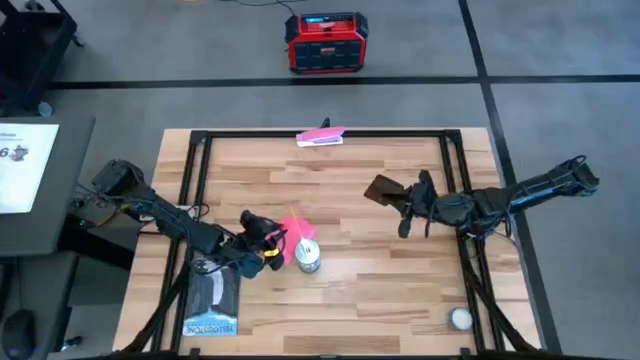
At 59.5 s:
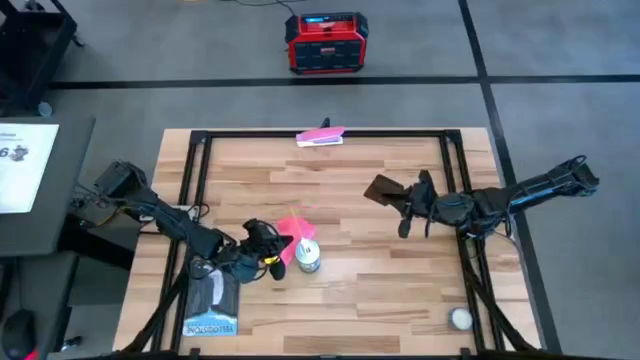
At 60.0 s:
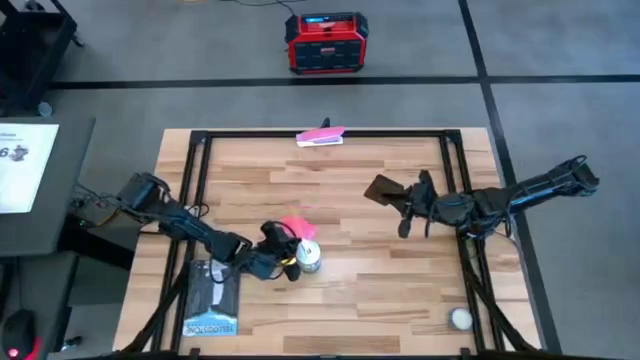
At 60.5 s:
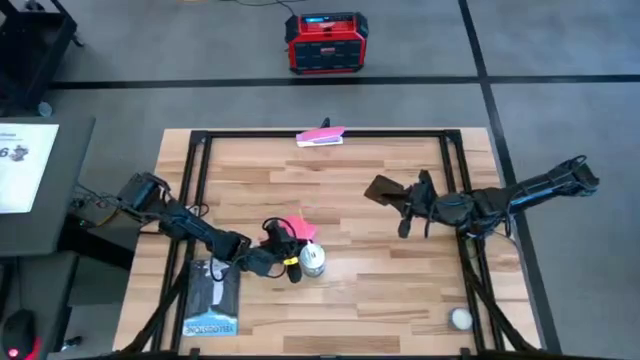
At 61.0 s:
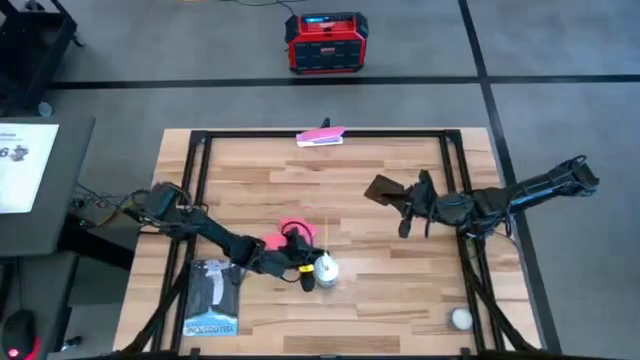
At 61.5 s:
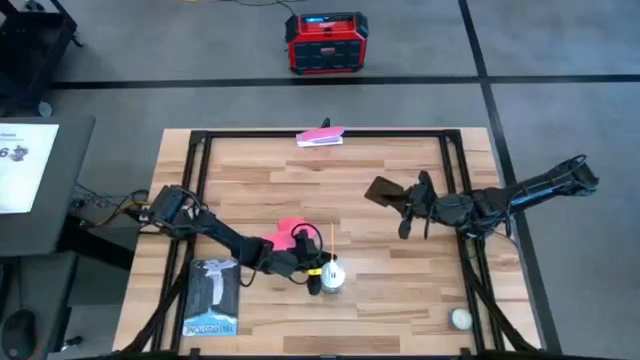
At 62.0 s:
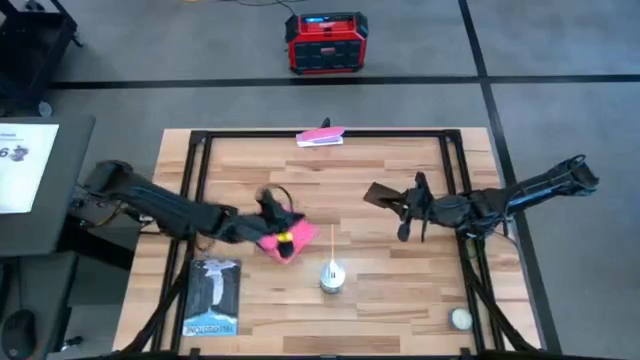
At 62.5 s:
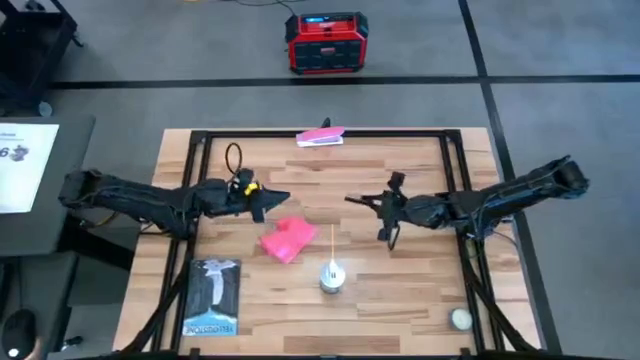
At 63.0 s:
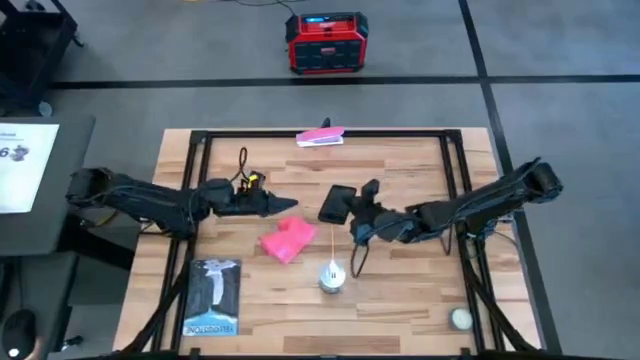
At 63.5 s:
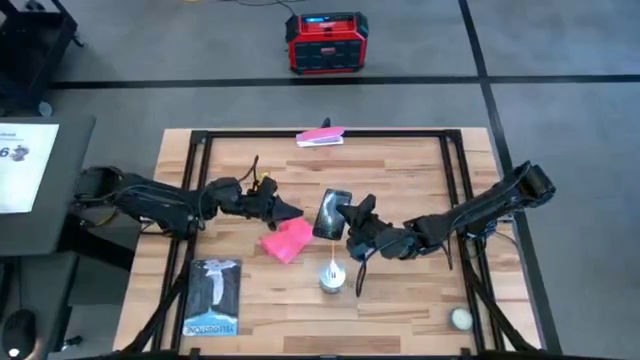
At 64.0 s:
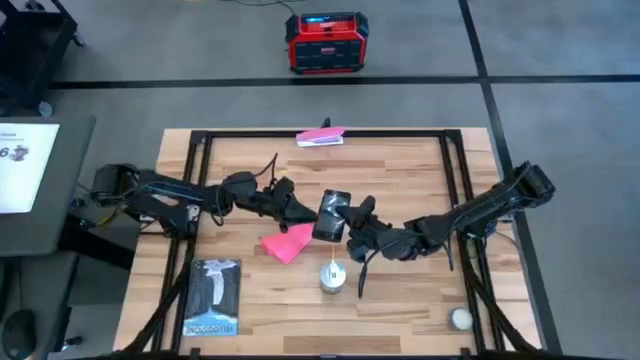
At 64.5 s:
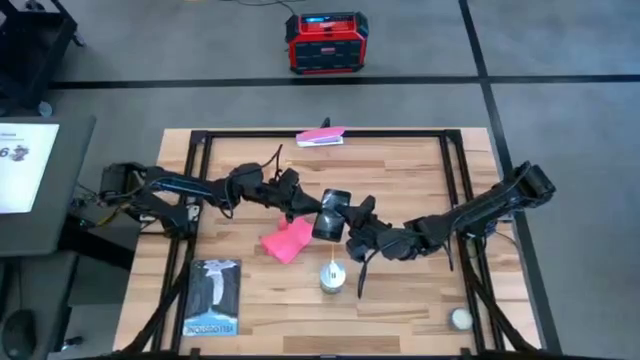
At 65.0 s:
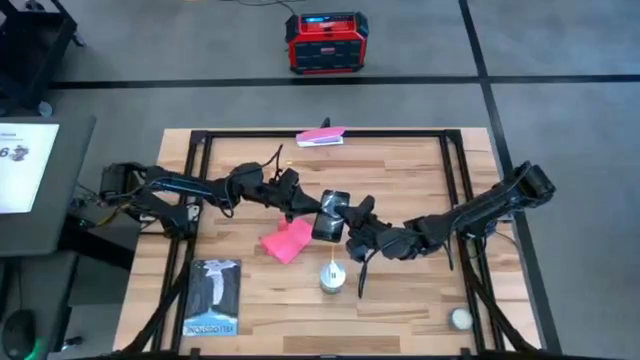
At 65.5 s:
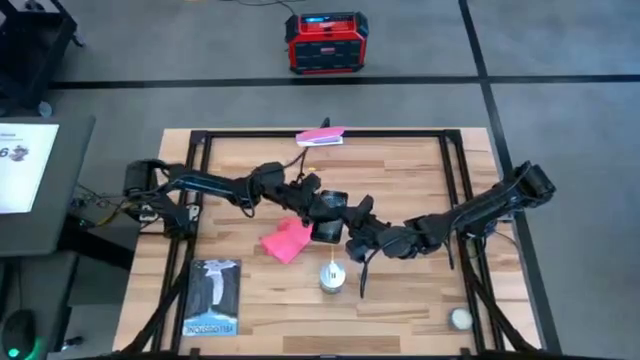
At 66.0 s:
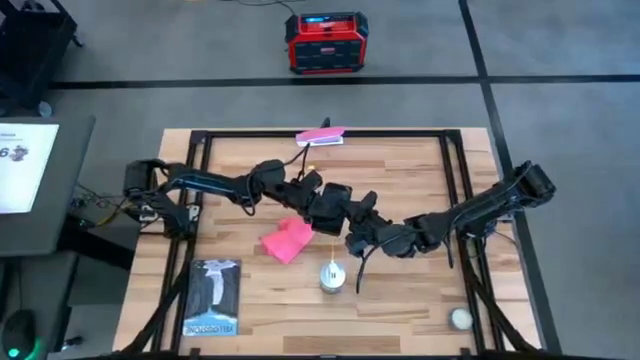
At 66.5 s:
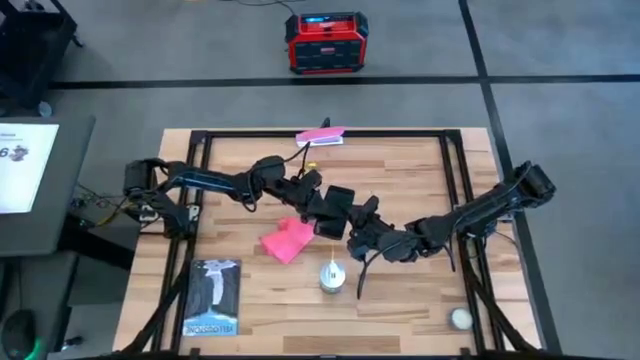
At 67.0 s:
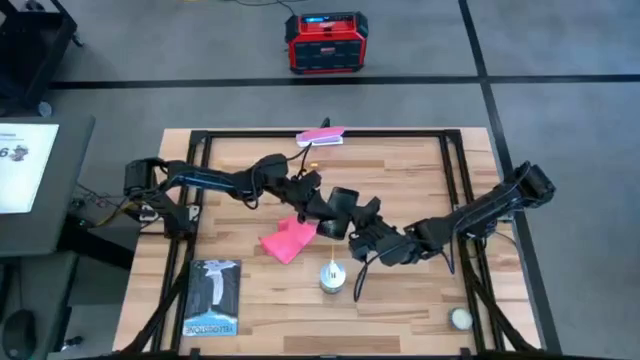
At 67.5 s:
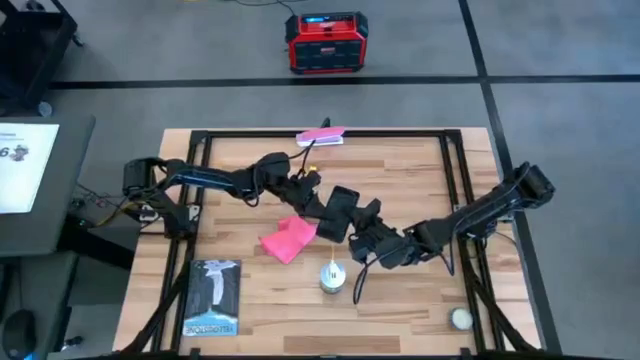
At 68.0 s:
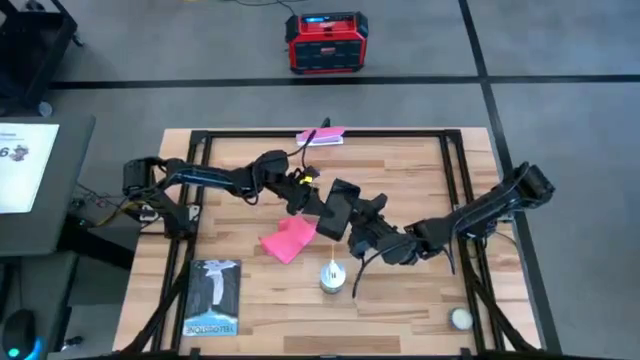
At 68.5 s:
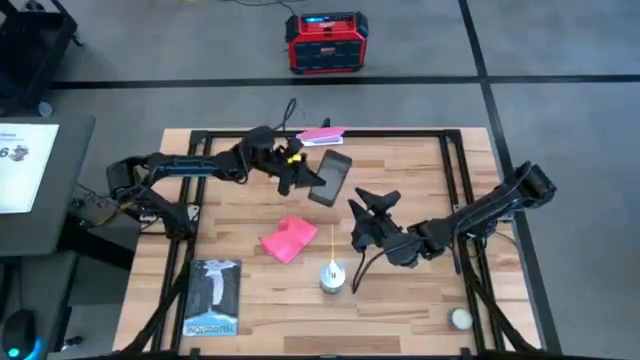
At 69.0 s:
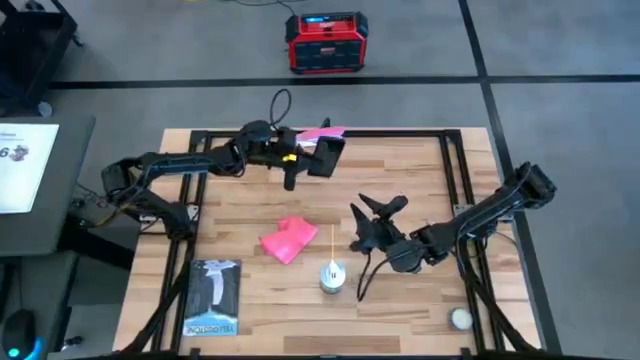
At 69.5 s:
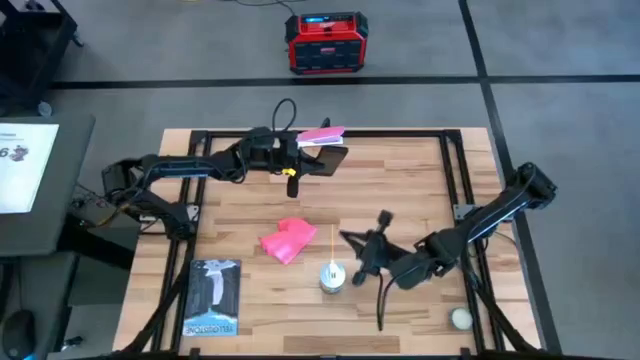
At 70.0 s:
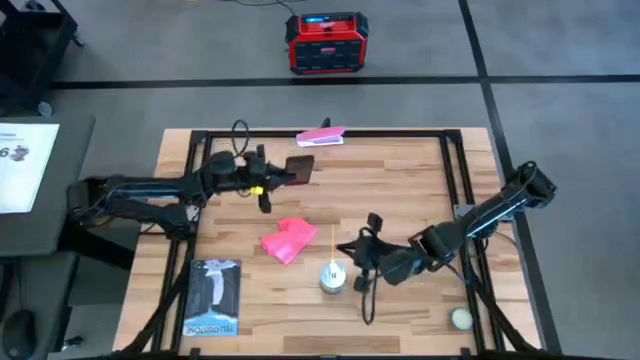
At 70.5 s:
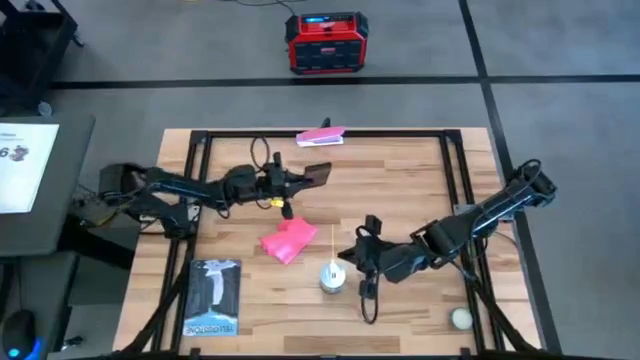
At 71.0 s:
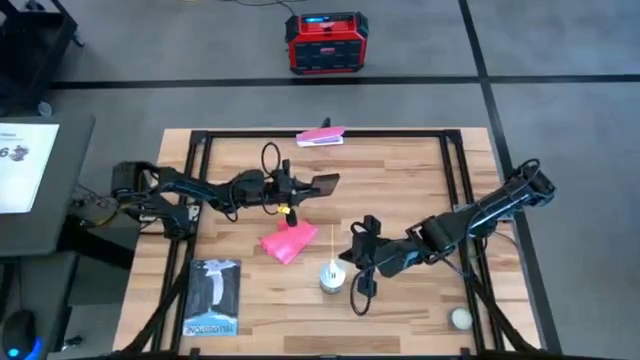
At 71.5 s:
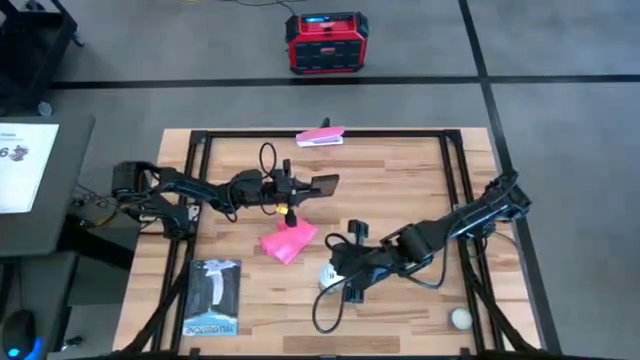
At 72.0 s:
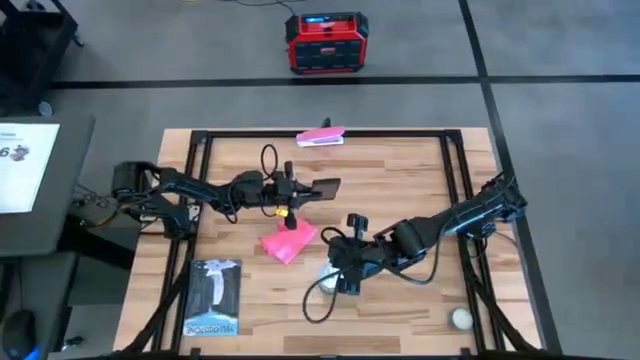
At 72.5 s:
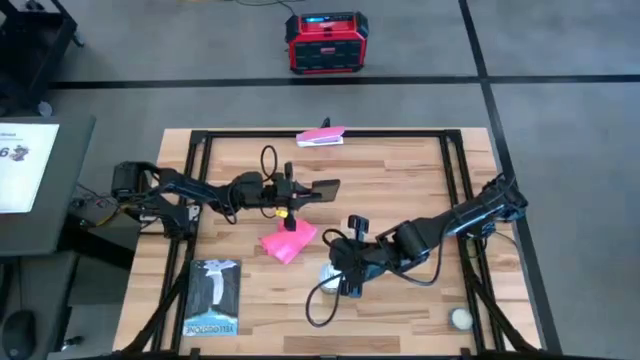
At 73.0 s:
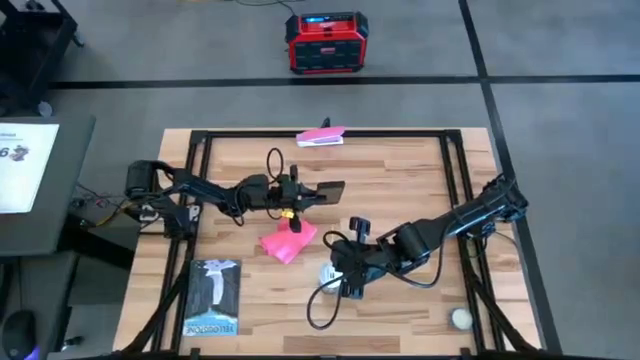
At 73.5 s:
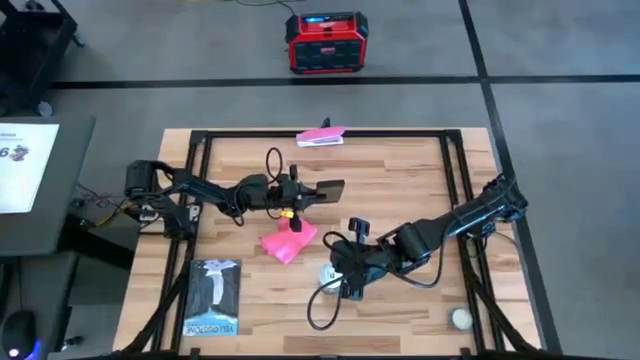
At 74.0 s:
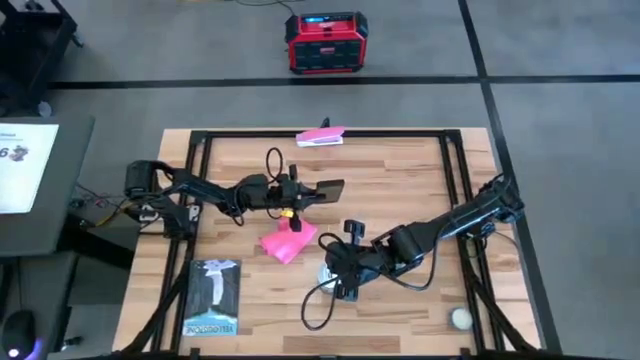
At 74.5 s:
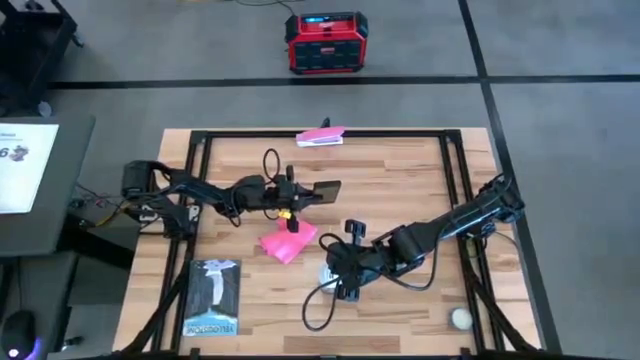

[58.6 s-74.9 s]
Task: Apply microfiber cloth
Spray the black cellphone
